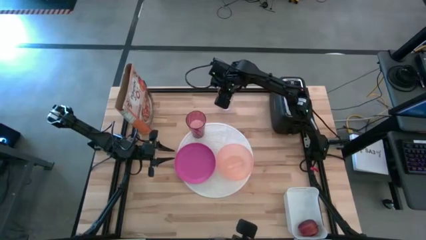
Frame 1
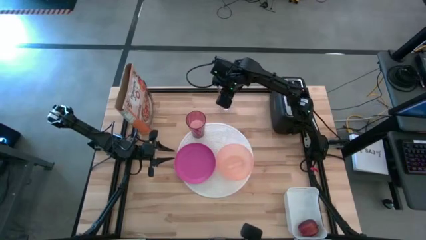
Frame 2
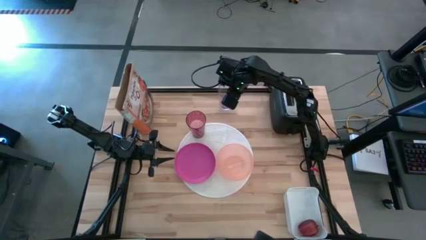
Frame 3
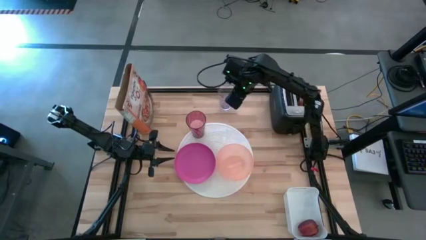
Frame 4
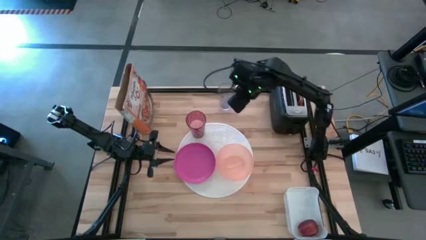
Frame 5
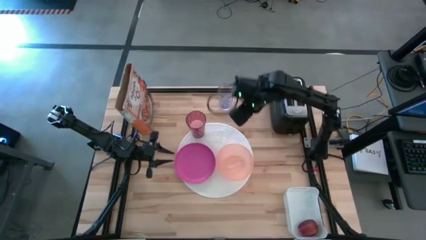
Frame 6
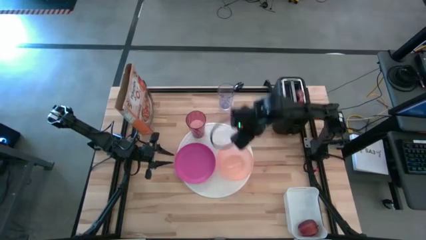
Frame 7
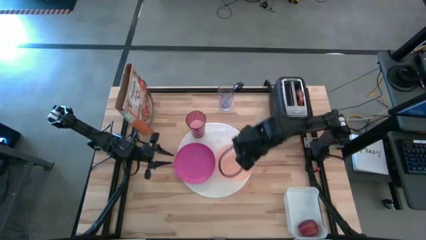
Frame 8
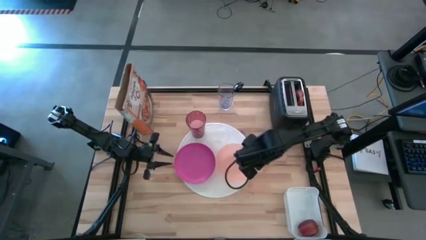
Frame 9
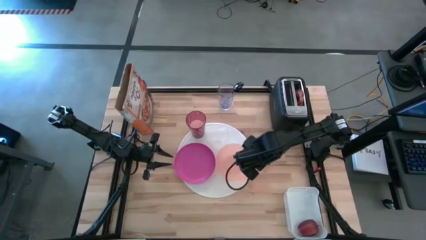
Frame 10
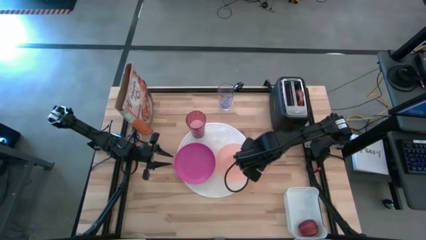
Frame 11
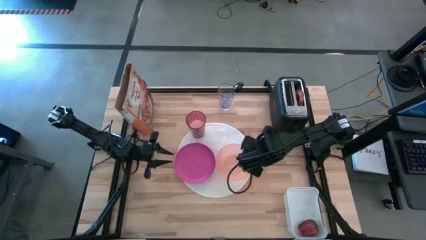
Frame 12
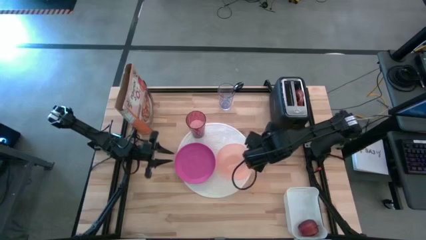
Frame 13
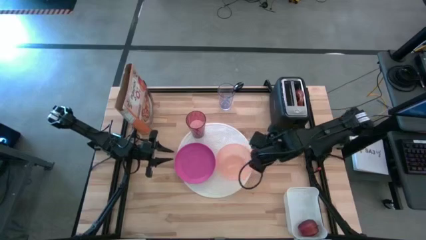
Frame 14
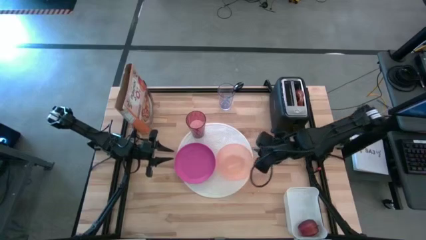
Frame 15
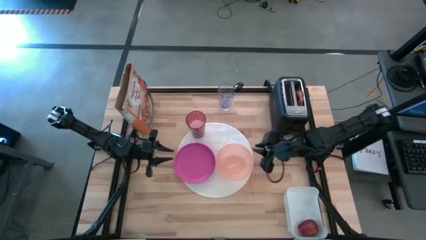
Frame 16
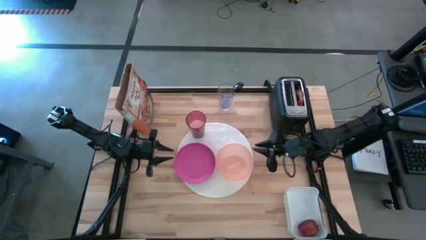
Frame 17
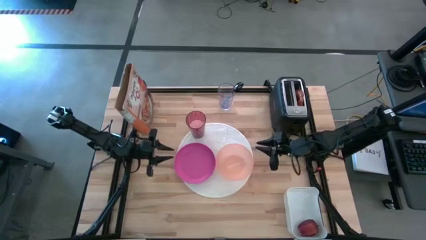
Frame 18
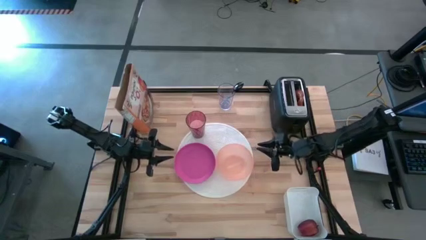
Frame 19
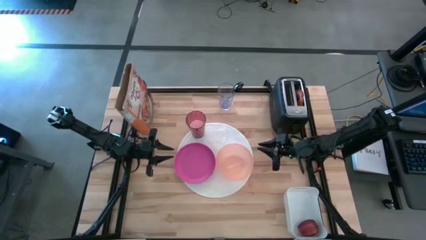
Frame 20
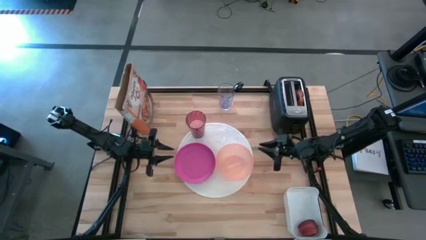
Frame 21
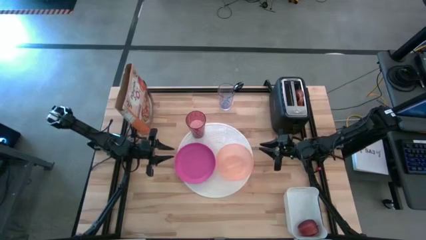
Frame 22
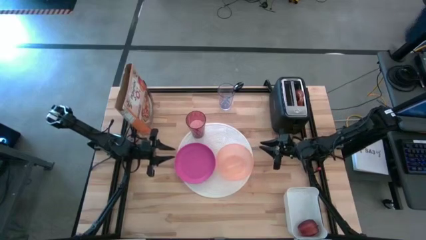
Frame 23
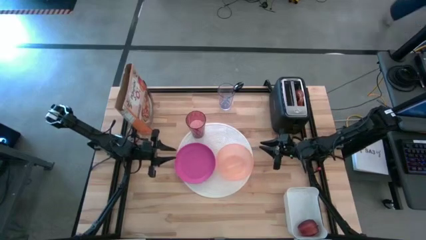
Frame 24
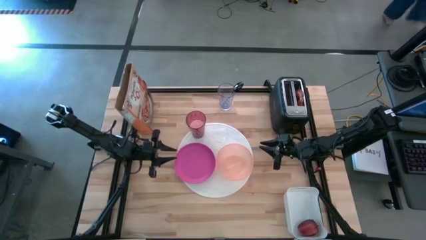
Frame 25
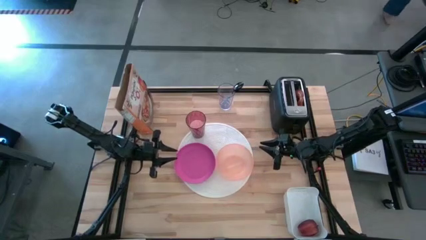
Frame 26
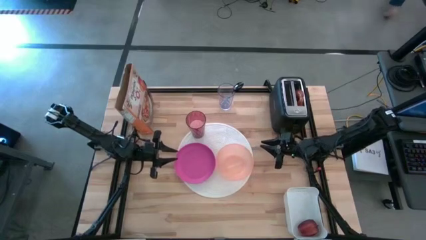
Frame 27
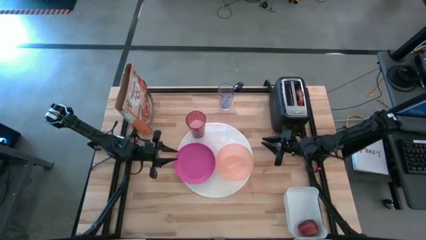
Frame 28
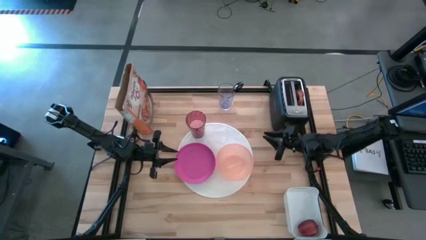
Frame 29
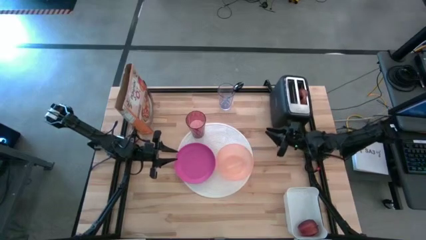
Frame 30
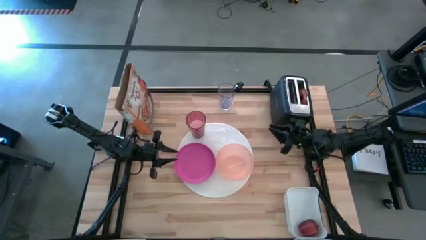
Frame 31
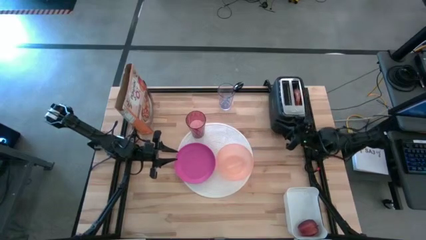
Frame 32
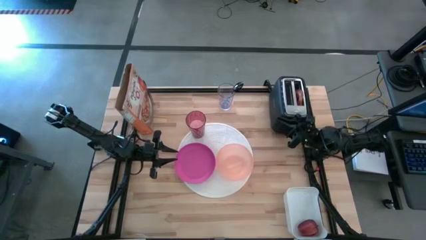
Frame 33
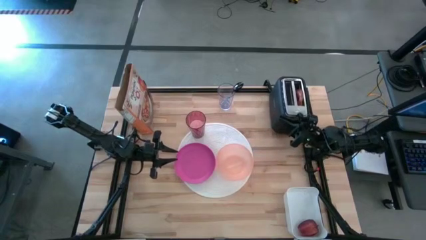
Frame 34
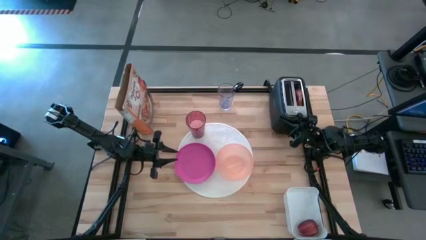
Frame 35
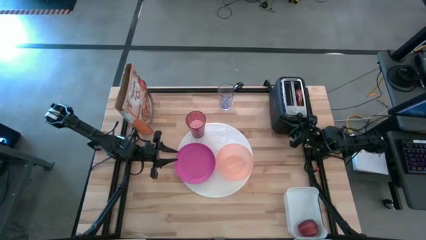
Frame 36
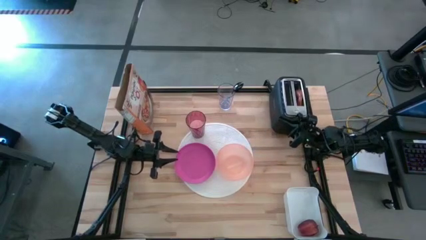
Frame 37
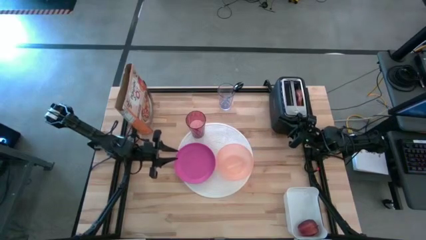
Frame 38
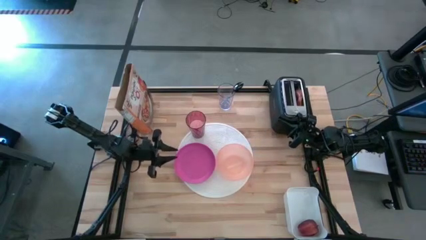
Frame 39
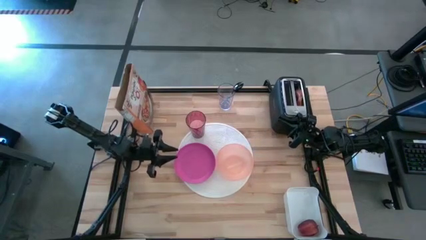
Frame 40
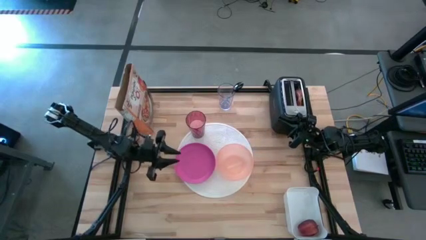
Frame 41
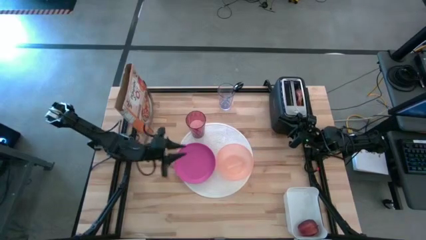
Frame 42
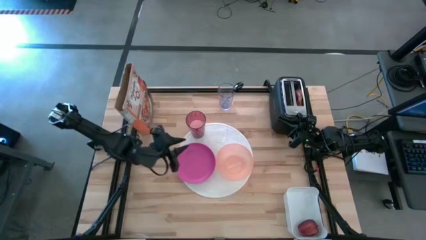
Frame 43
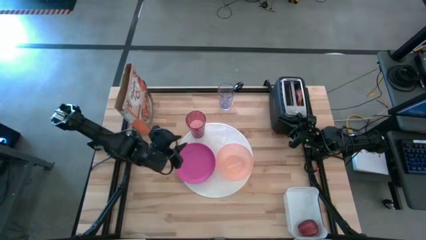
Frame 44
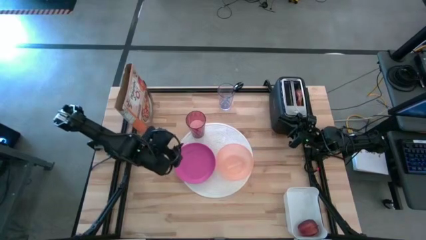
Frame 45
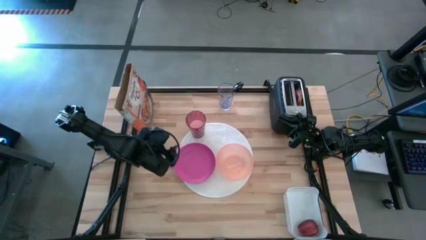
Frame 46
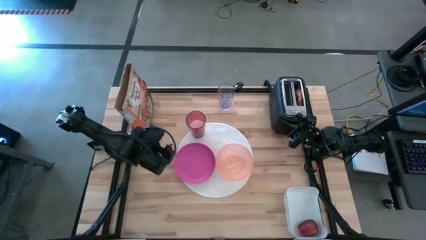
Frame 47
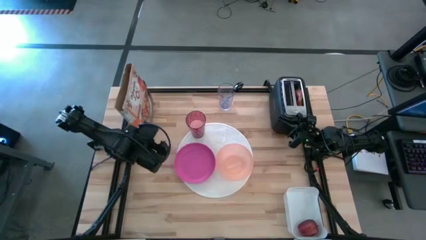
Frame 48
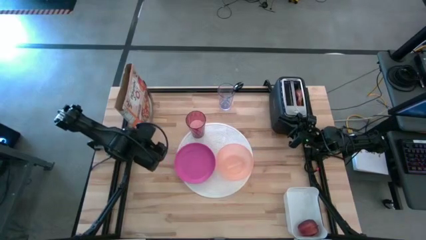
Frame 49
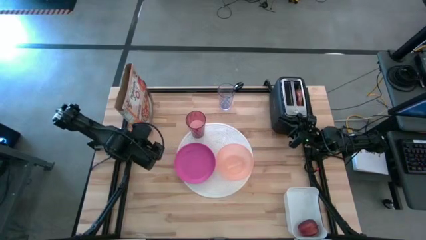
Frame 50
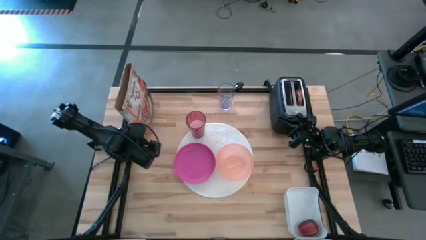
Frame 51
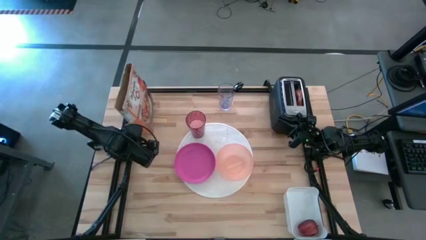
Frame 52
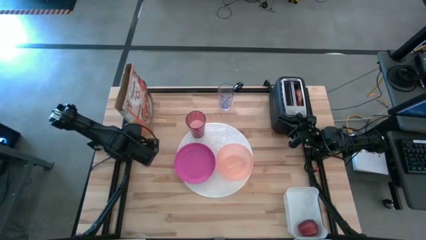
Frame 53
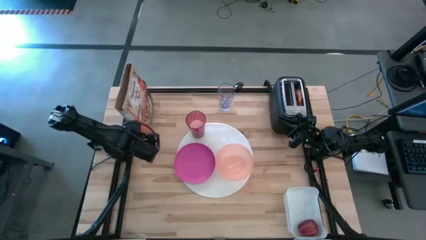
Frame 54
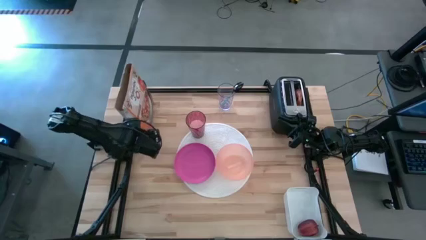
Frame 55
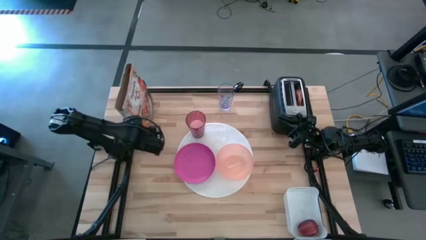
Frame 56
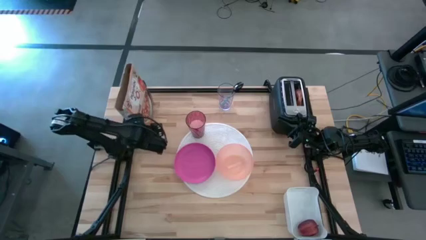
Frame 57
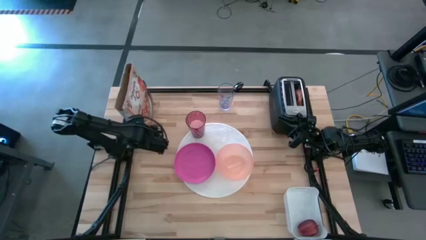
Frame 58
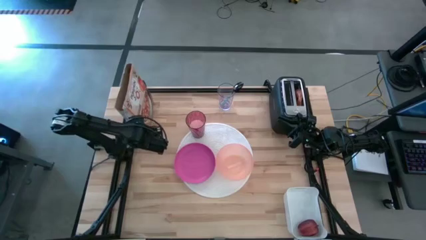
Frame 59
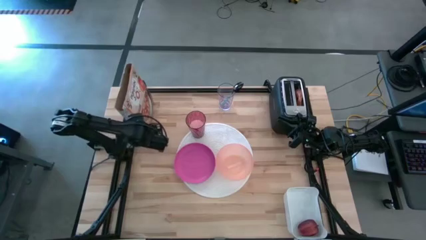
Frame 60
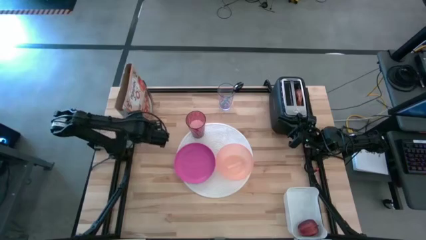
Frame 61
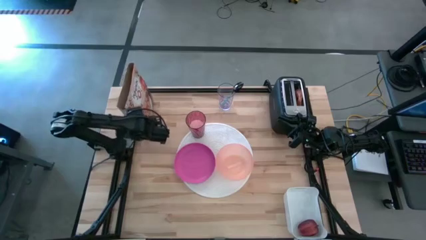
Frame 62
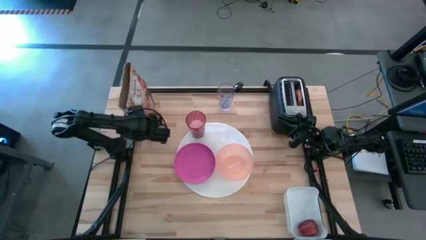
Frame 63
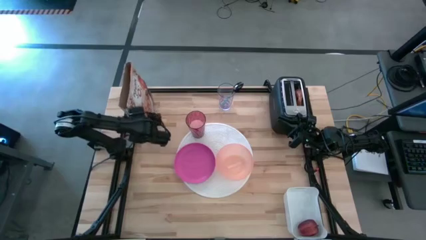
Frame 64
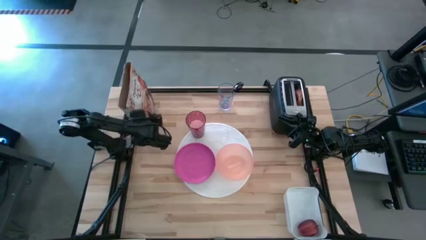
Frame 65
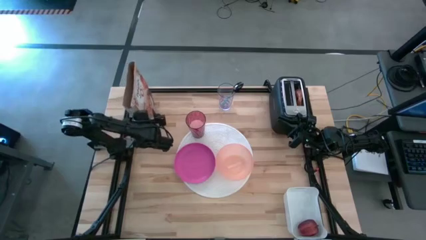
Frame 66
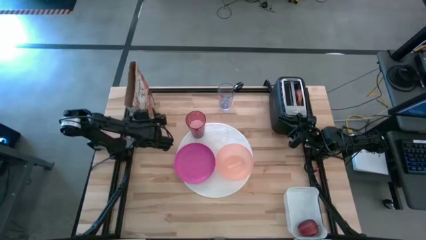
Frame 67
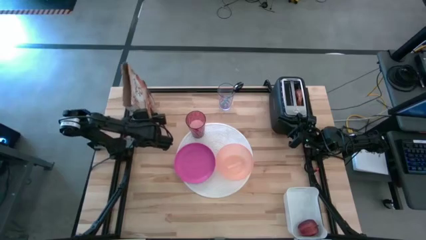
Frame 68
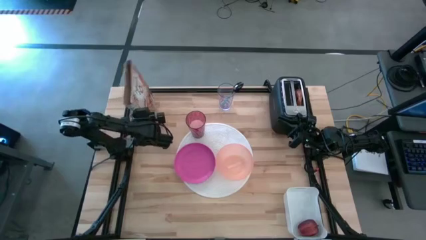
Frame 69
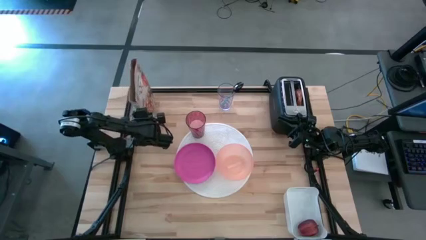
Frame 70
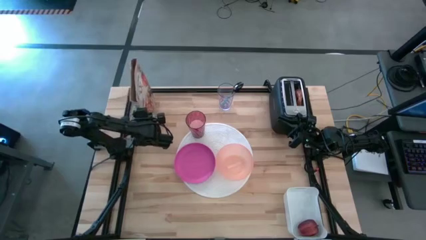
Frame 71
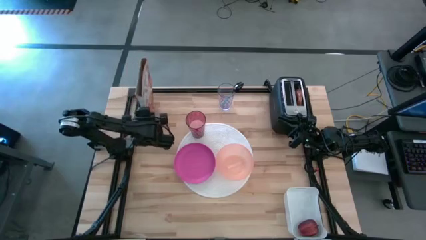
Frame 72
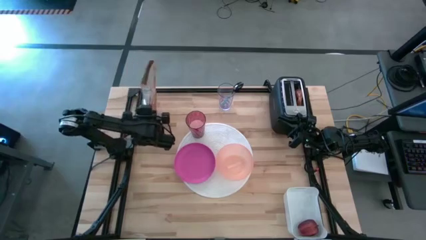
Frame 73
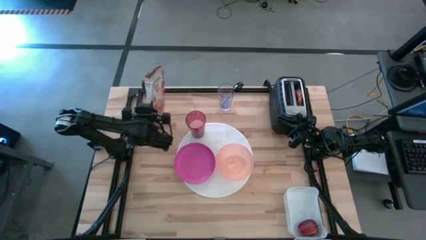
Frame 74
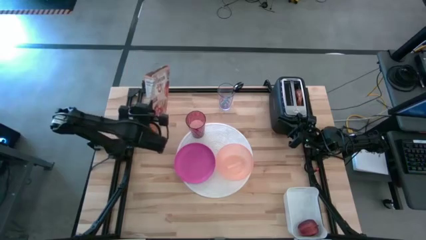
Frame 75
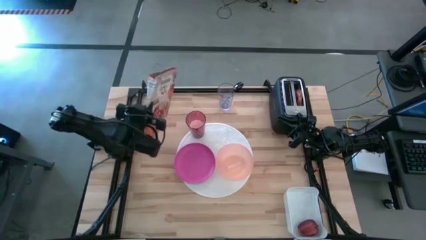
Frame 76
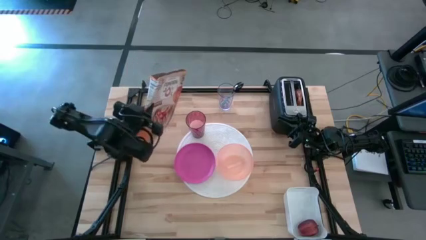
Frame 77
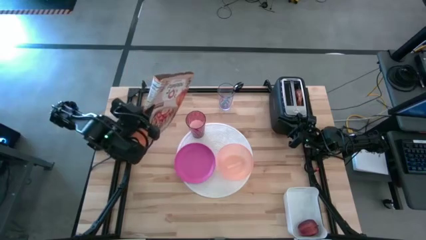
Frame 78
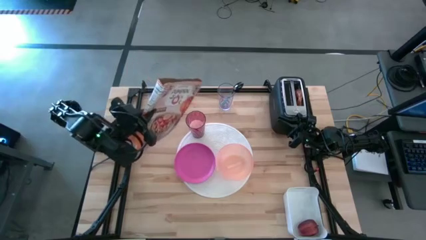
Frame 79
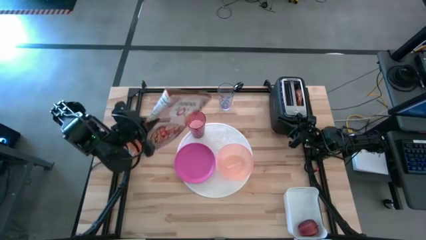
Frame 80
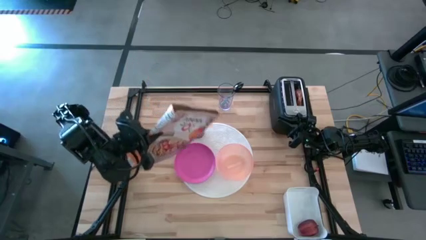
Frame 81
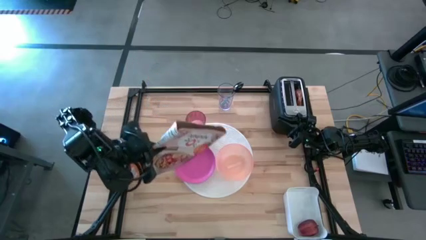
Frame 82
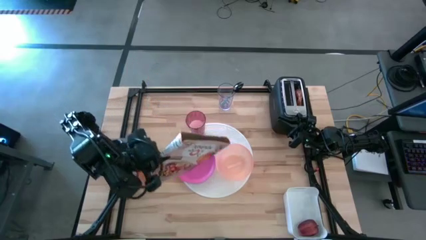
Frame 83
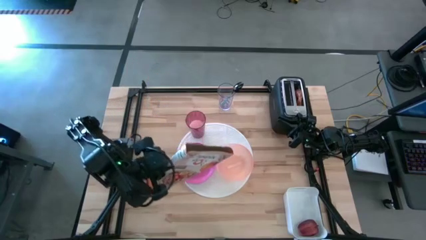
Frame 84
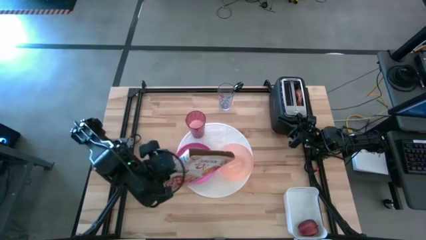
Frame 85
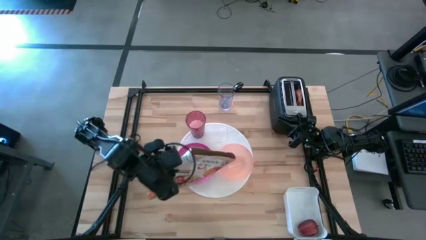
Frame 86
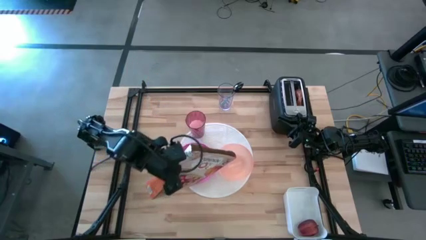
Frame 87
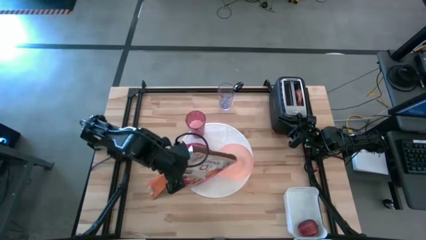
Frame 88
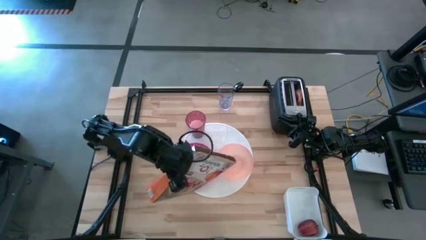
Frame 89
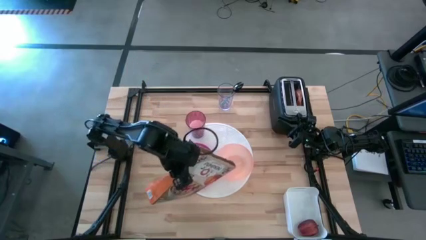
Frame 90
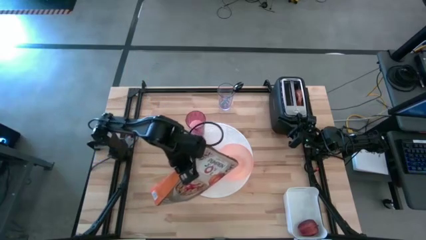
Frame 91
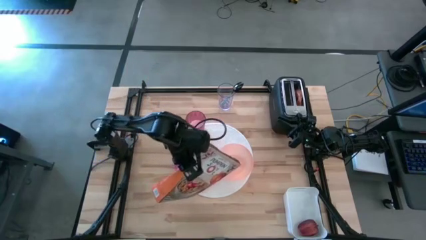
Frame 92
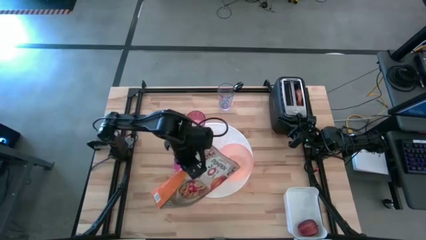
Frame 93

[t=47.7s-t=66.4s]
Task: Arrange a breakfast setting
Pour the cereal into the orange bowl
